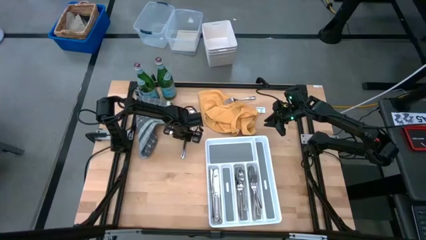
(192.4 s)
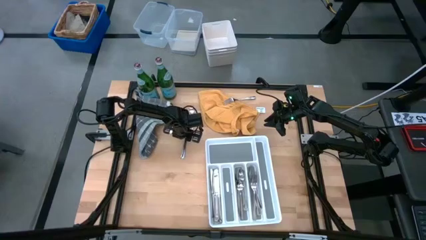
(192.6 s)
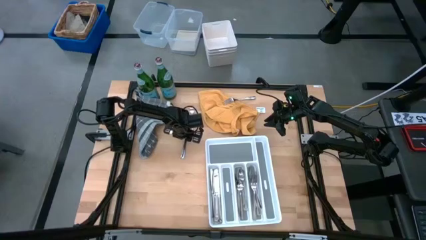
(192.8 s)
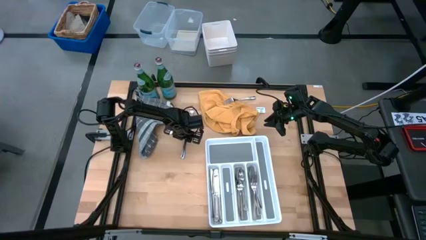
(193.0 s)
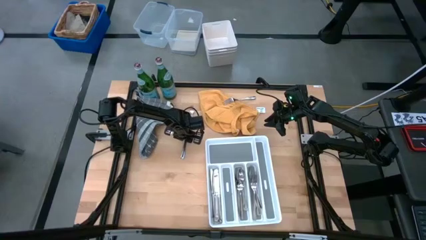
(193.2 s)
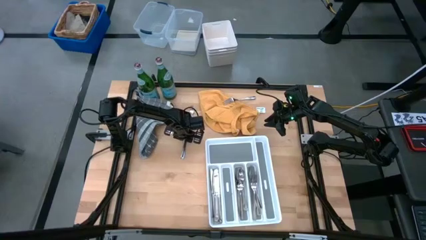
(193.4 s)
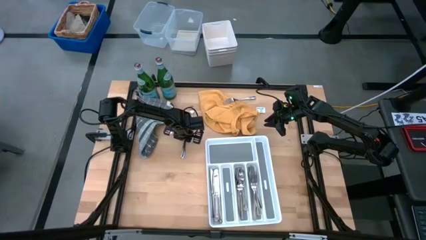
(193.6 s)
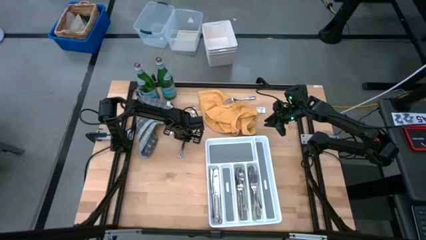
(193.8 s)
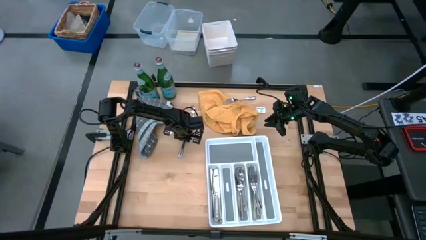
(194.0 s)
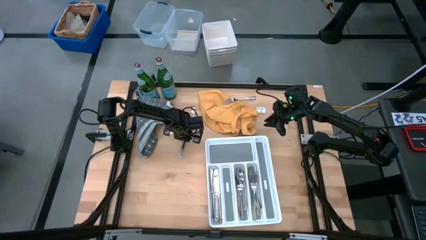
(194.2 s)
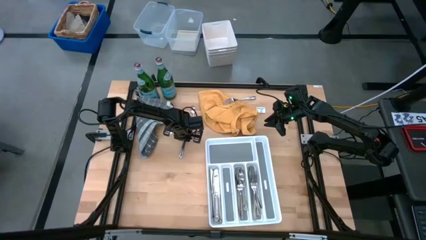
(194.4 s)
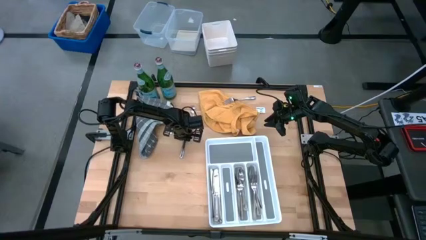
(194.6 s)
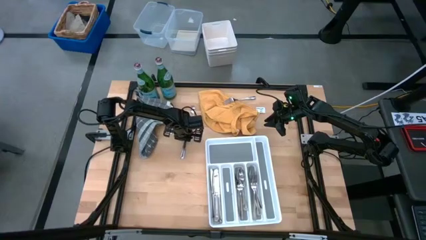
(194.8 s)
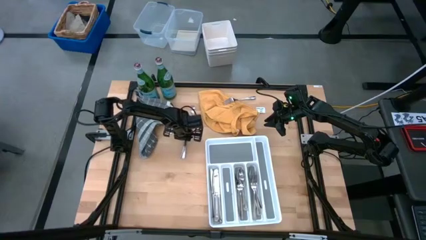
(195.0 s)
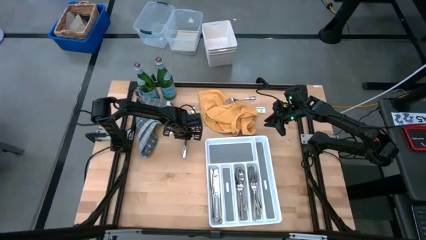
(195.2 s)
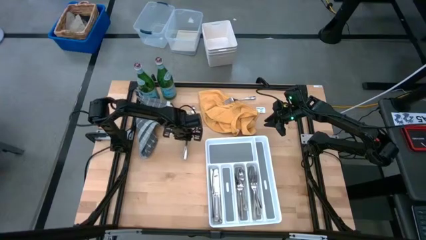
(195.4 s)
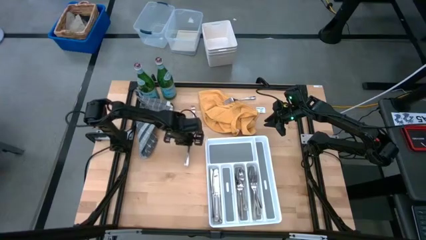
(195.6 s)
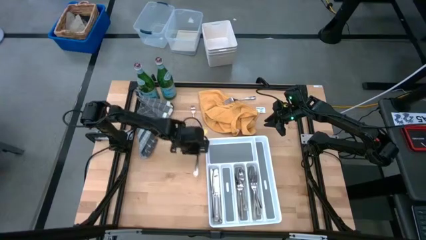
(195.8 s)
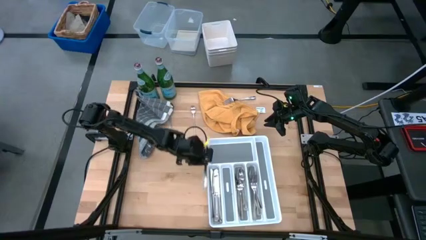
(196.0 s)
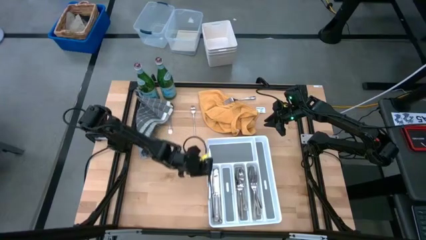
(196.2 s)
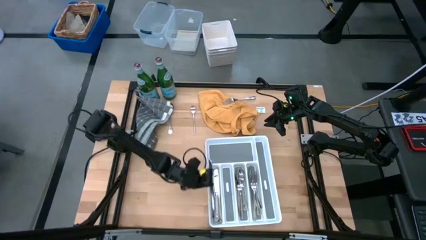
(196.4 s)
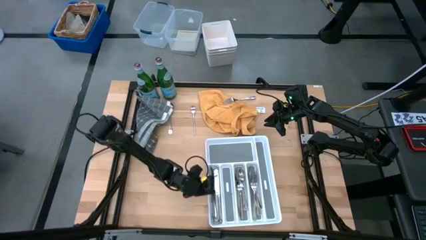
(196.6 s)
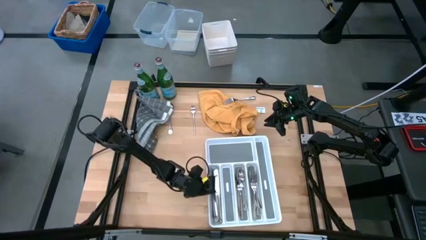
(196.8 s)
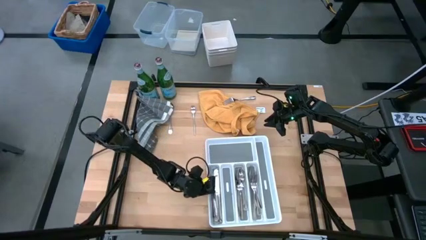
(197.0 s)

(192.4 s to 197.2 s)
Task: Sort silverware
Put the table knife into the silverware tray

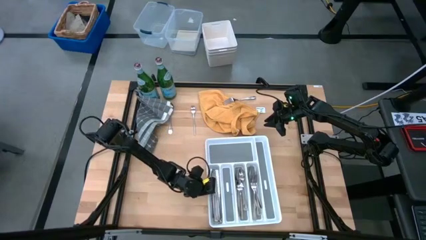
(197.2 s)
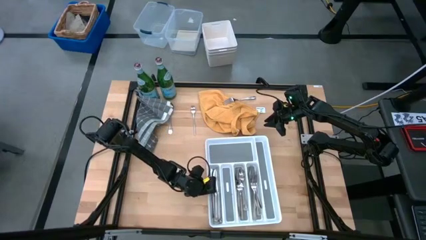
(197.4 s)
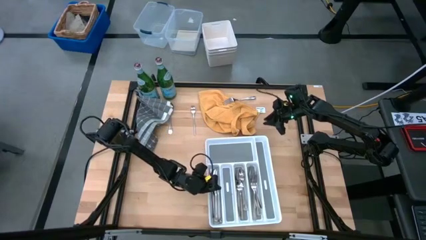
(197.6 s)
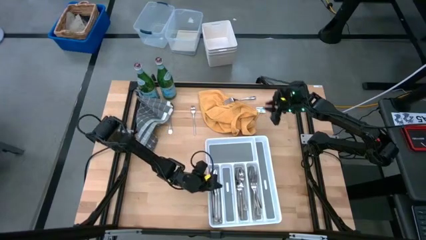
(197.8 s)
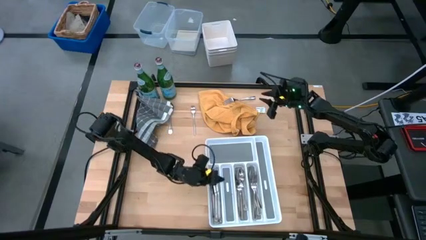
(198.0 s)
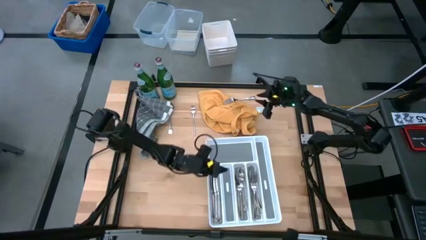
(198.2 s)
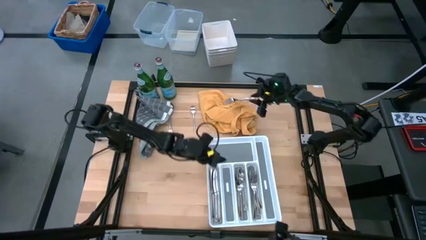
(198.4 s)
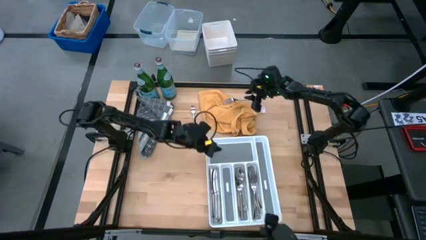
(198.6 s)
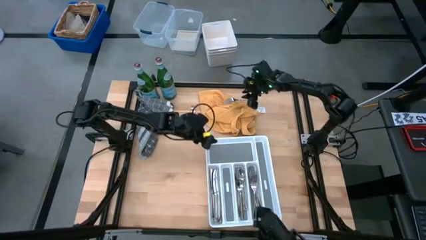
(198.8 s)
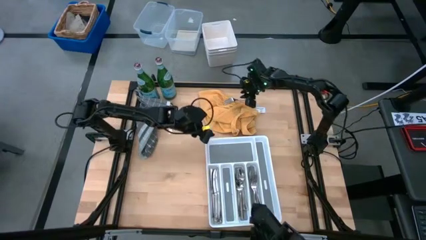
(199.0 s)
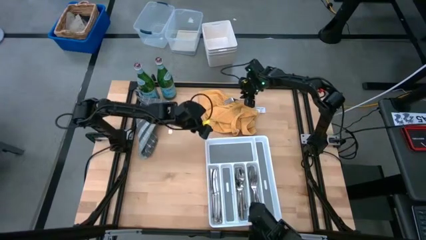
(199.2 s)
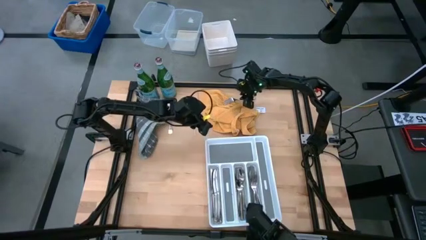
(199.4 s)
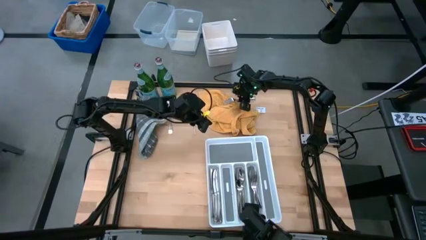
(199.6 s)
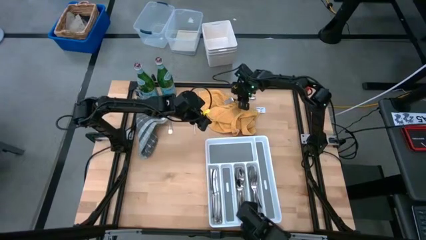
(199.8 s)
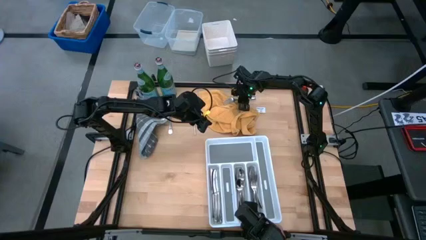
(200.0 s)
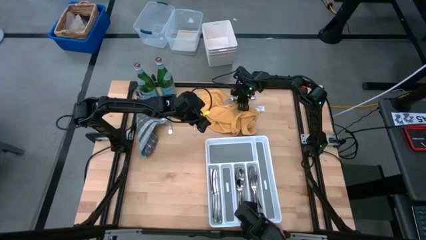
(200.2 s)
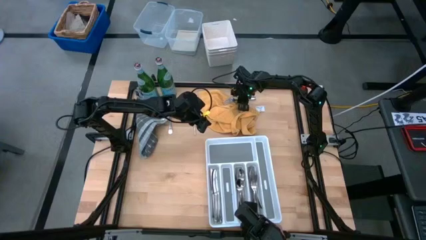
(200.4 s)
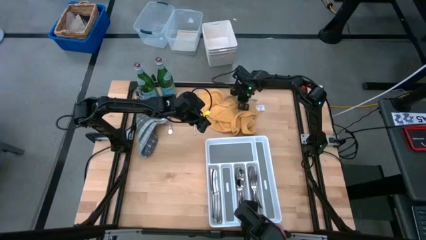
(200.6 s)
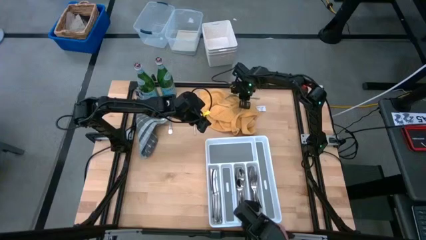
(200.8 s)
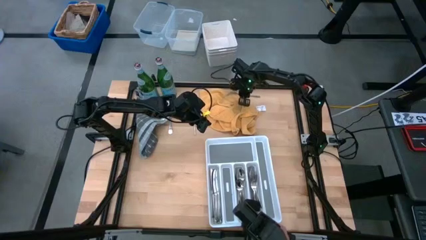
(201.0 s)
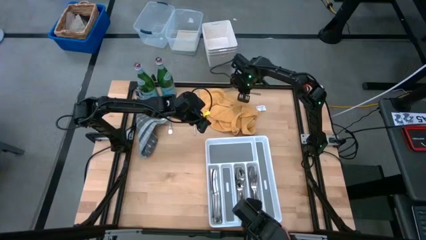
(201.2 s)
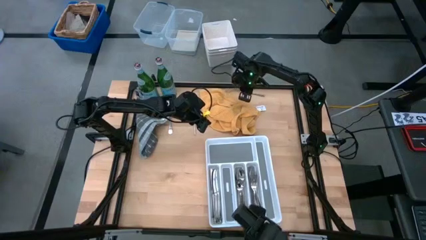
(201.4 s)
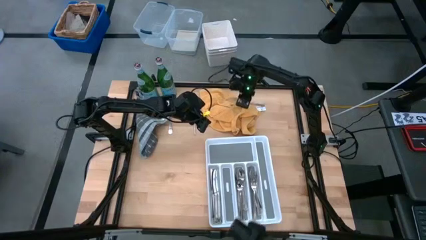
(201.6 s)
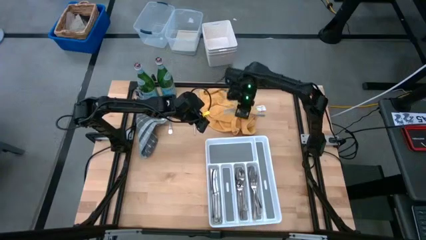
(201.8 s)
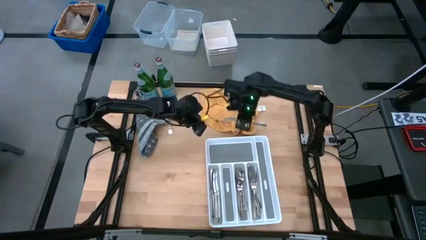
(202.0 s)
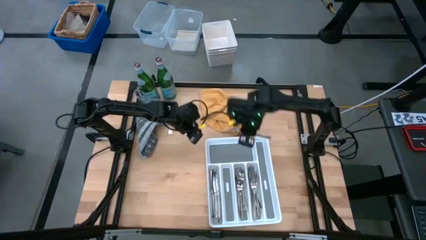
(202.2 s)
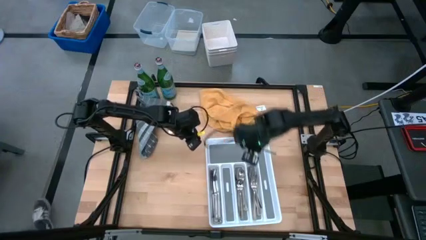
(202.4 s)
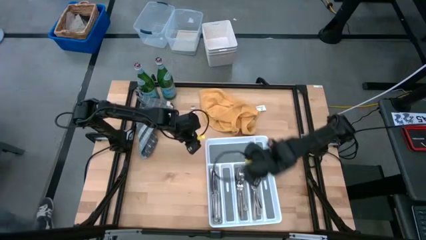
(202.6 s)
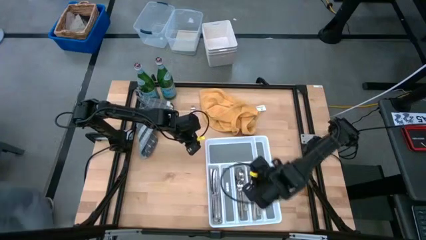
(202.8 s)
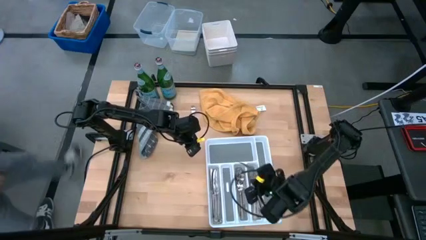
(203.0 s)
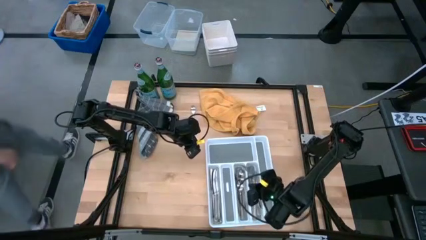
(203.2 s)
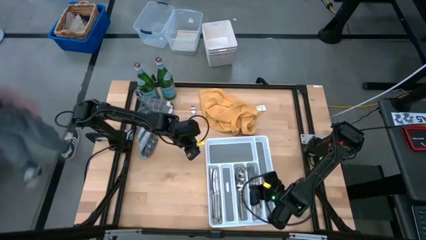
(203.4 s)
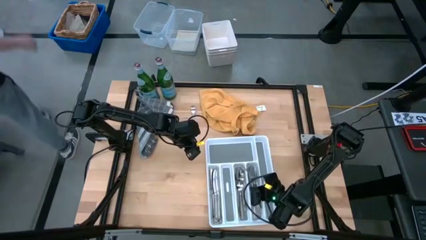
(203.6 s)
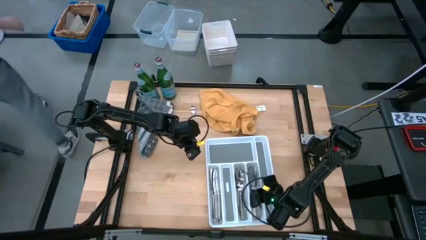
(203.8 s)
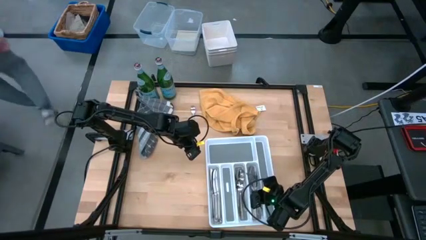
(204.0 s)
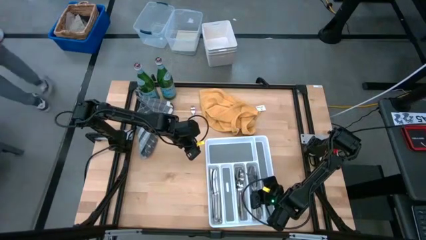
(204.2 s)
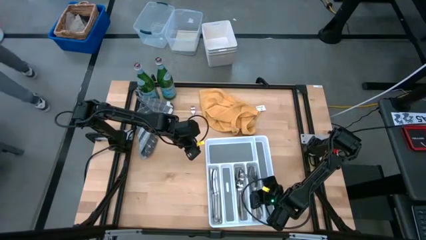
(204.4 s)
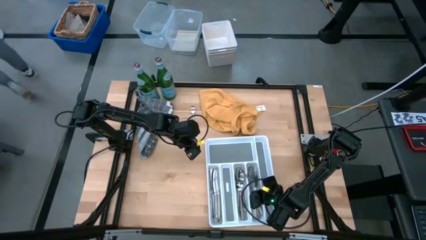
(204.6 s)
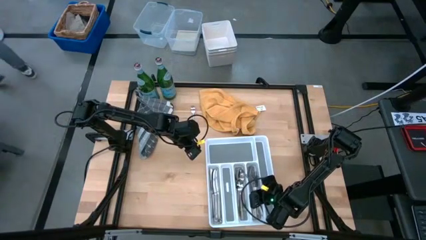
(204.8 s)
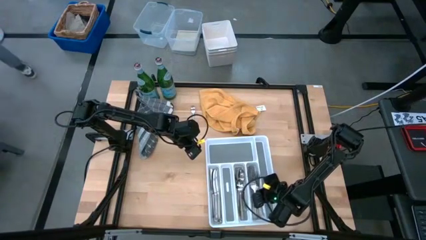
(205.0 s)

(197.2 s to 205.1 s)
Put the fork into the silverware tray

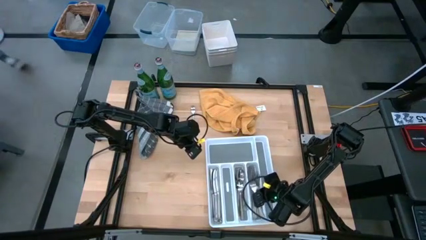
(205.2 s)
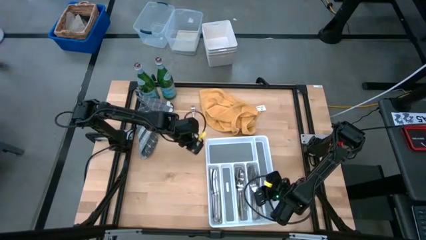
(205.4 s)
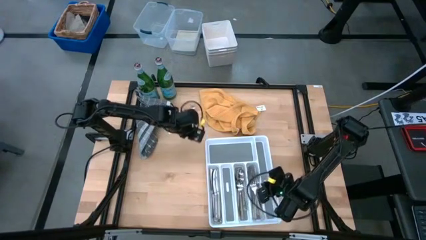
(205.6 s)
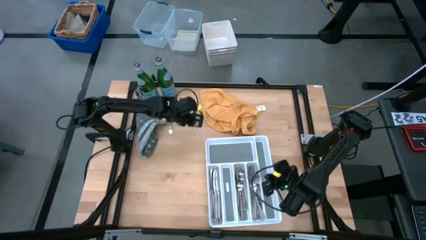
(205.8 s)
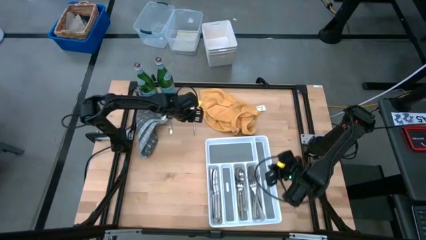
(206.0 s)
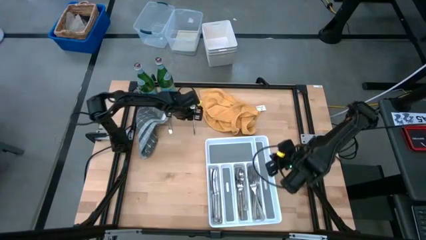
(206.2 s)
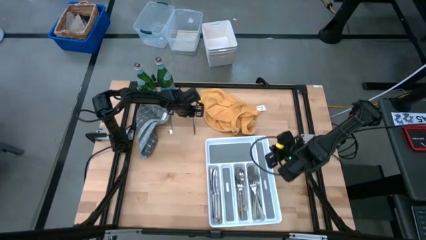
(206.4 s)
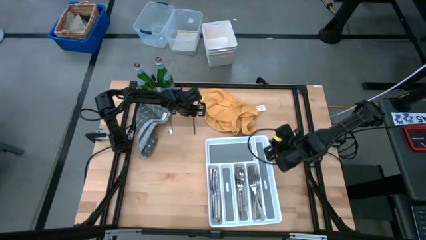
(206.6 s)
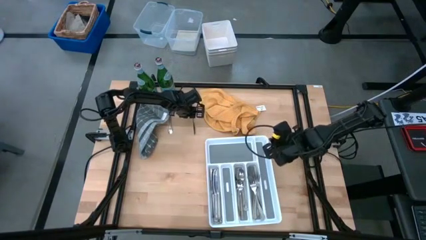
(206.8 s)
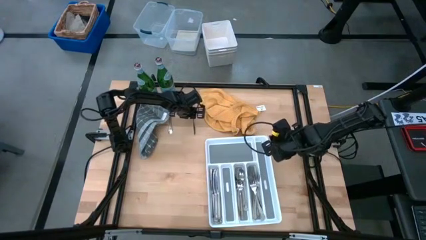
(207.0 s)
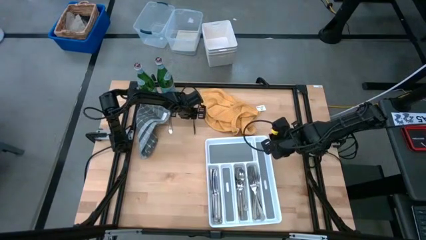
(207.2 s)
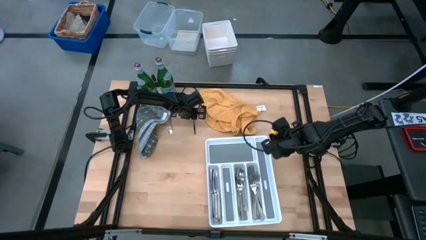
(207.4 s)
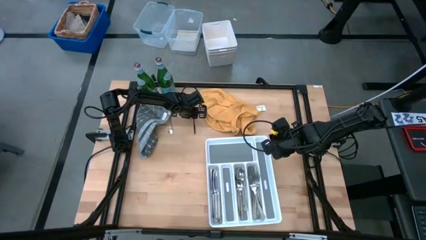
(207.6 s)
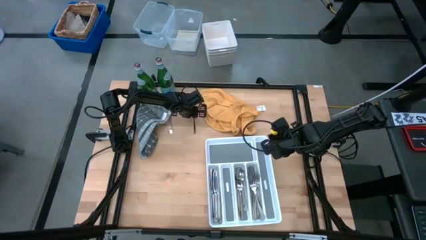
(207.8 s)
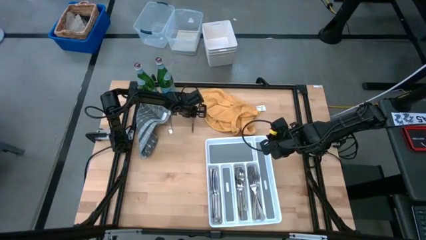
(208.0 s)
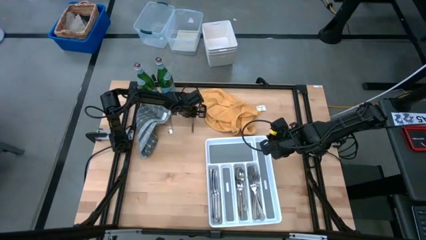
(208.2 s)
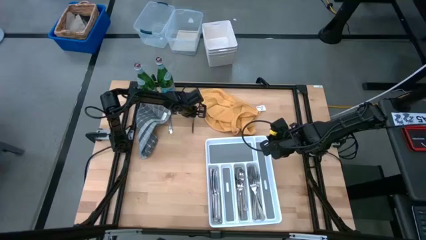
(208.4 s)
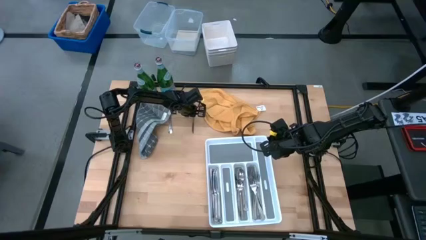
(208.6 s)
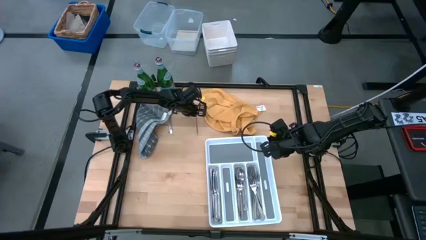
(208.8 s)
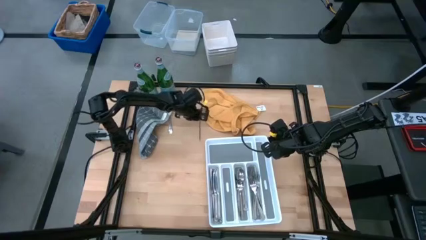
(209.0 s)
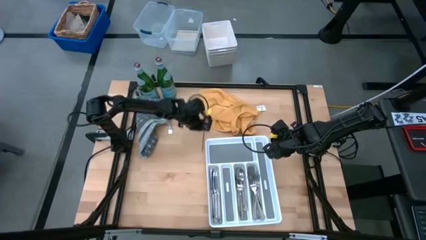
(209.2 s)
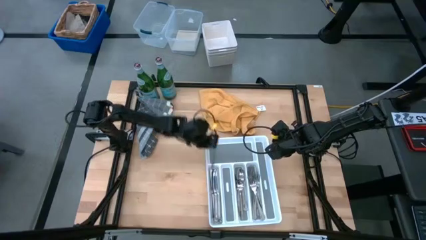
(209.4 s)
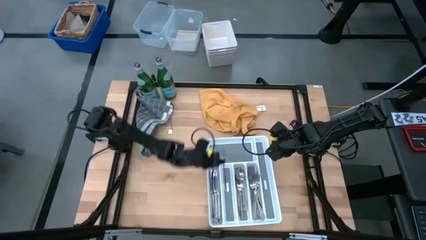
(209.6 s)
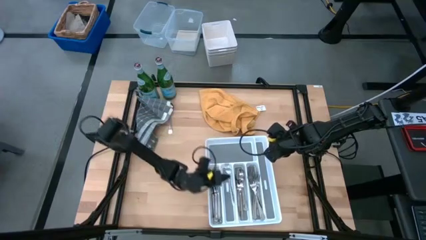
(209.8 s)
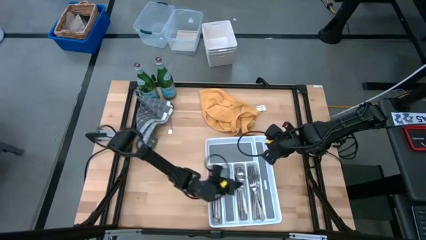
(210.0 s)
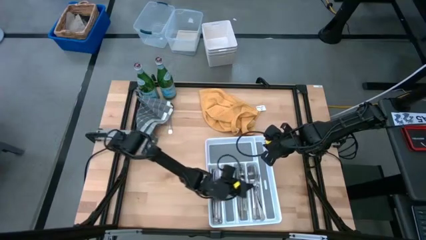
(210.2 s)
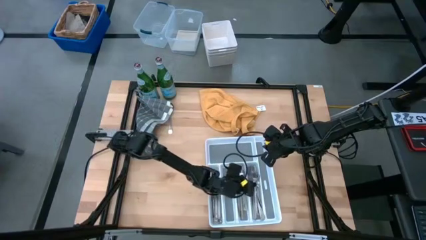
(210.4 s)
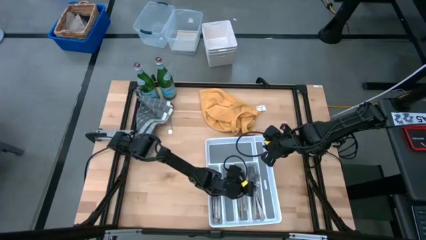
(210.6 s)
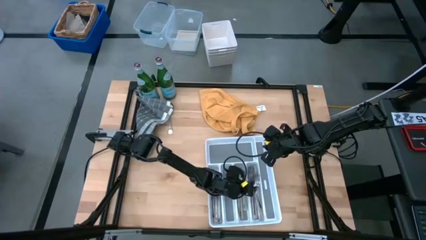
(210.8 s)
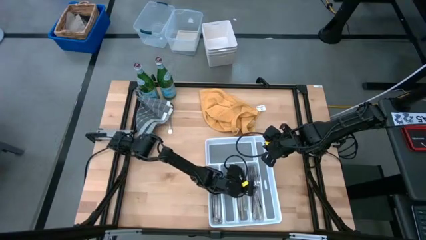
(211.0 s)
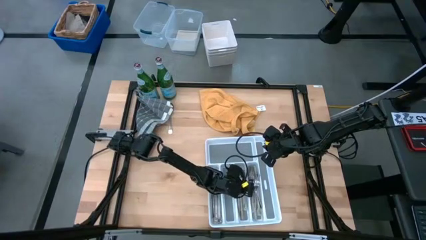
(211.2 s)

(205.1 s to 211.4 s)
Put the fork into the silverware tray
